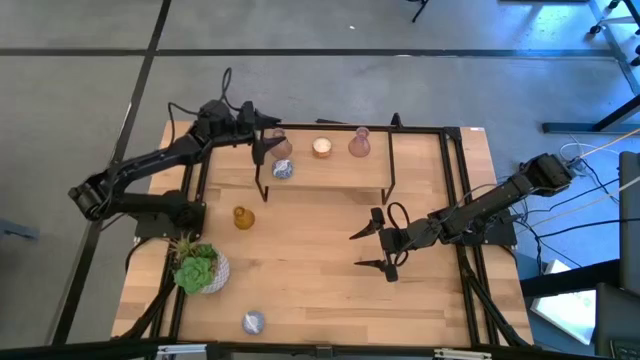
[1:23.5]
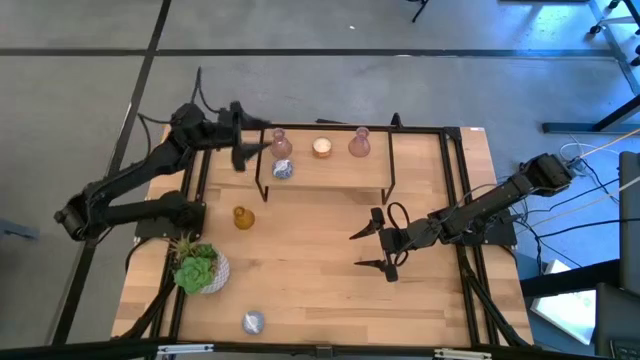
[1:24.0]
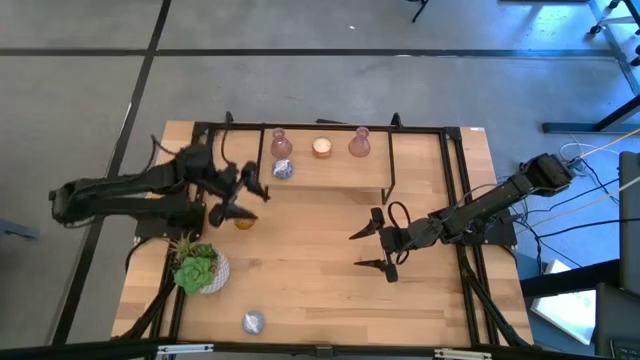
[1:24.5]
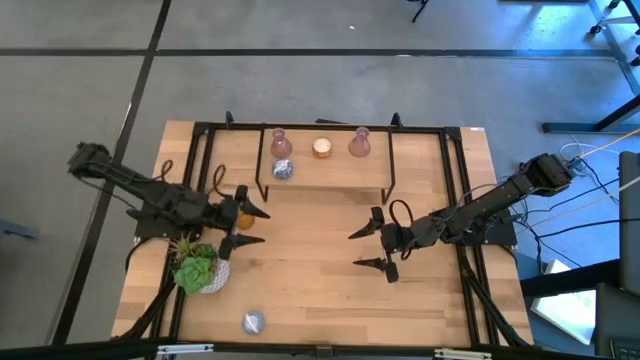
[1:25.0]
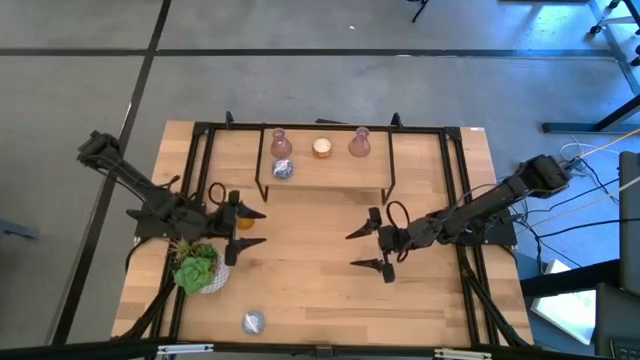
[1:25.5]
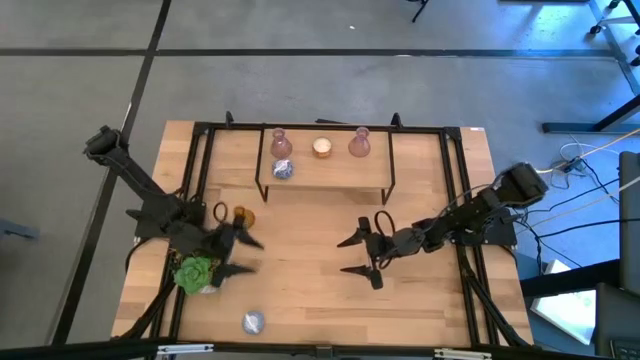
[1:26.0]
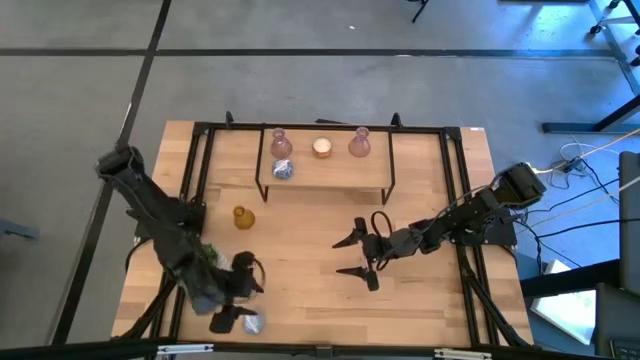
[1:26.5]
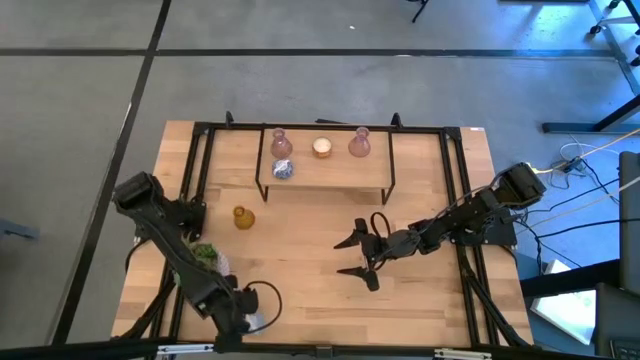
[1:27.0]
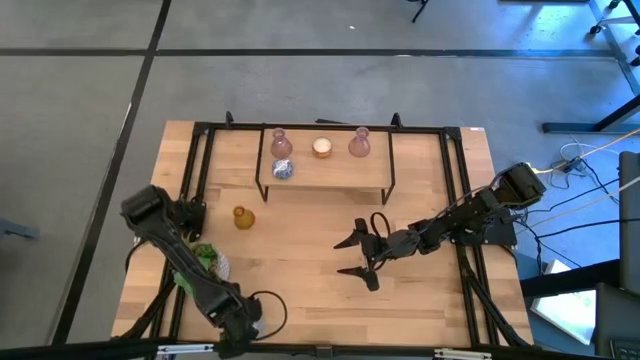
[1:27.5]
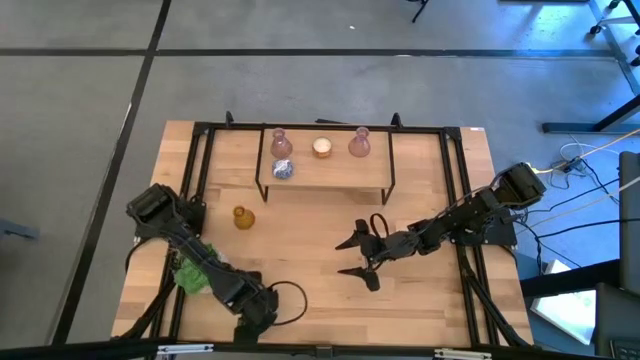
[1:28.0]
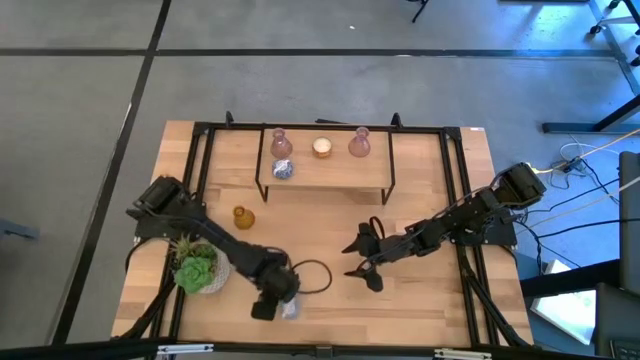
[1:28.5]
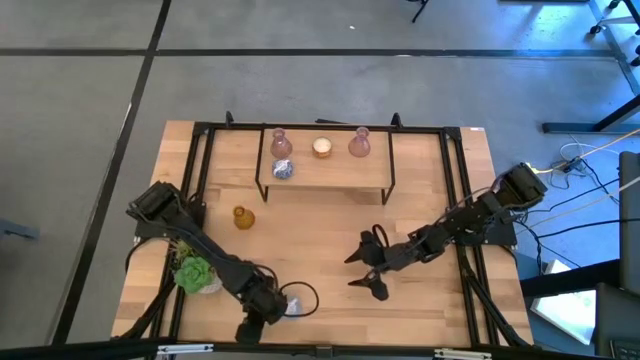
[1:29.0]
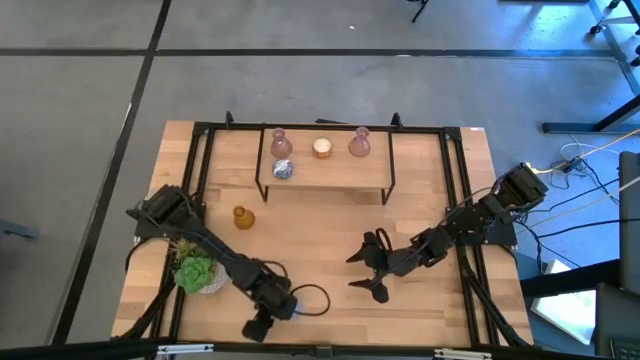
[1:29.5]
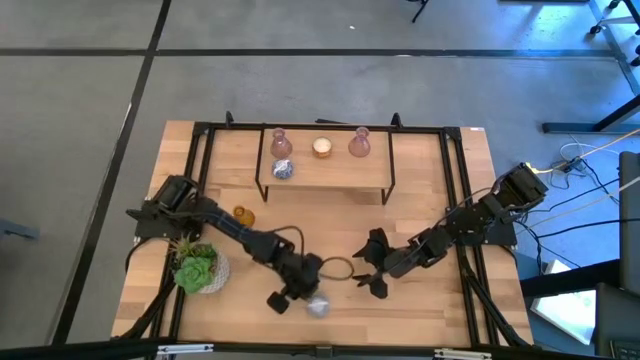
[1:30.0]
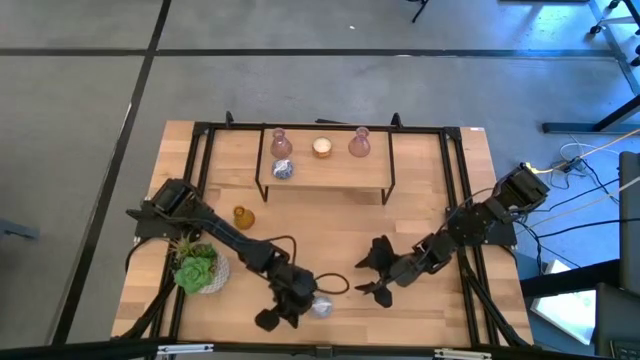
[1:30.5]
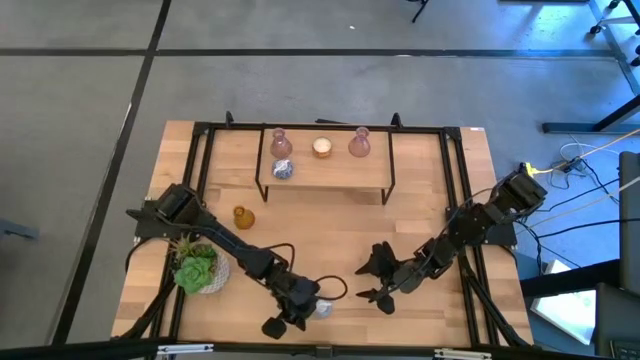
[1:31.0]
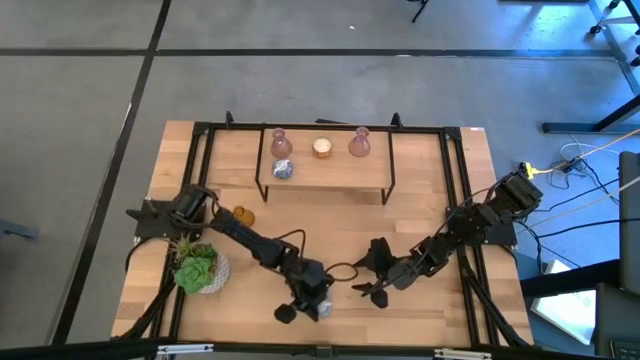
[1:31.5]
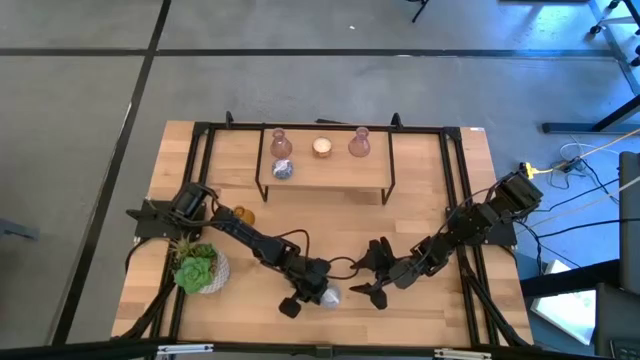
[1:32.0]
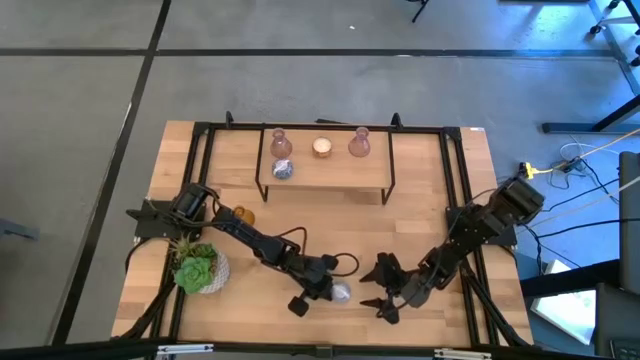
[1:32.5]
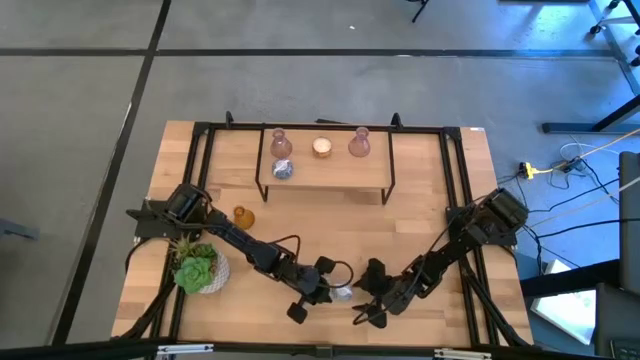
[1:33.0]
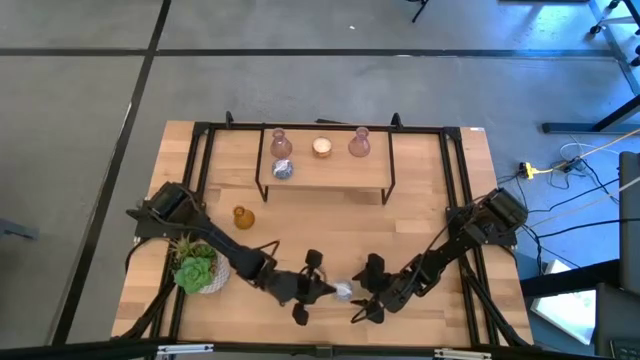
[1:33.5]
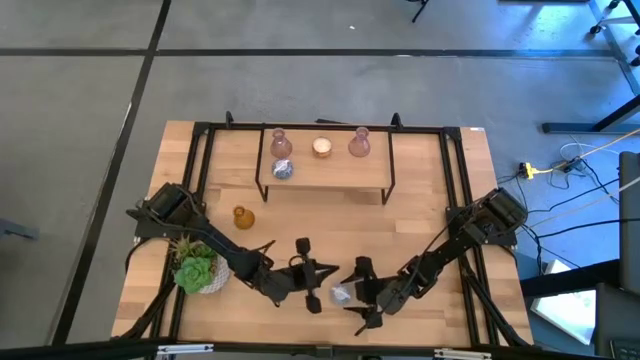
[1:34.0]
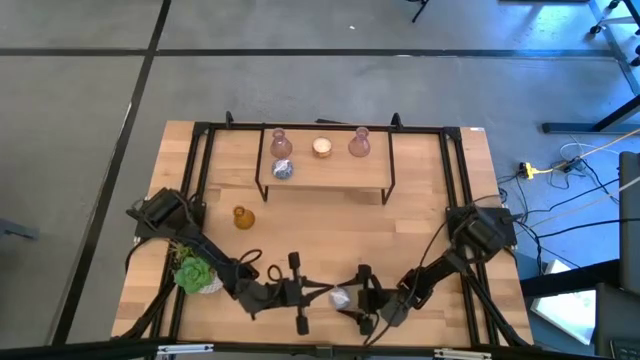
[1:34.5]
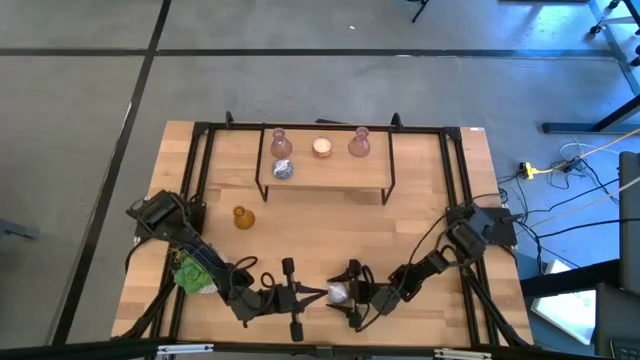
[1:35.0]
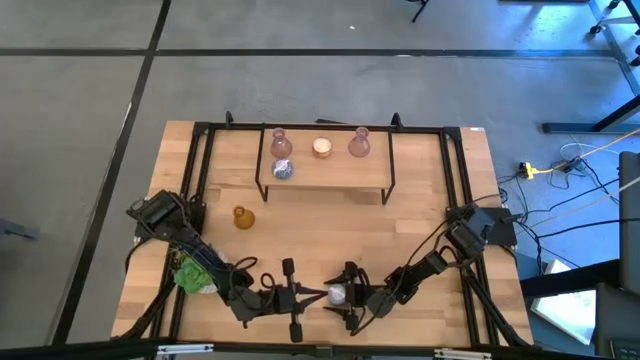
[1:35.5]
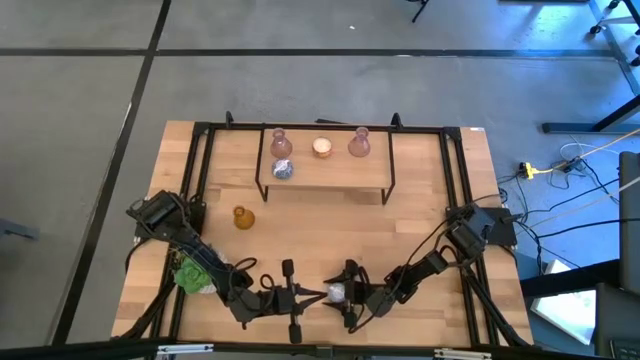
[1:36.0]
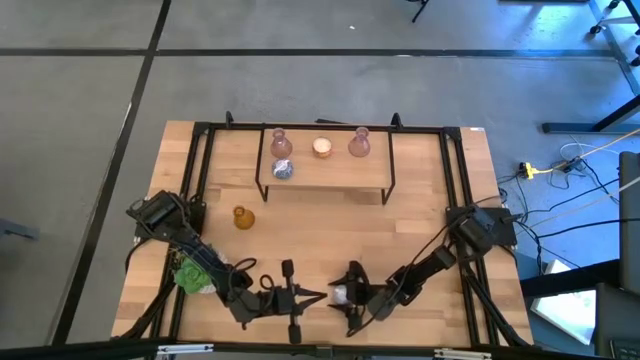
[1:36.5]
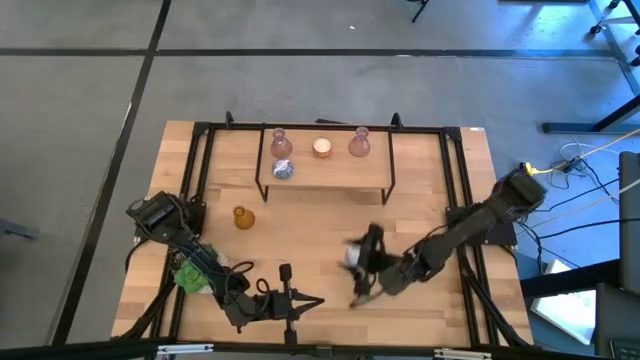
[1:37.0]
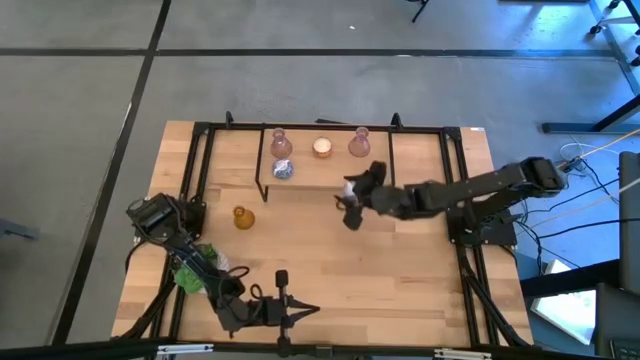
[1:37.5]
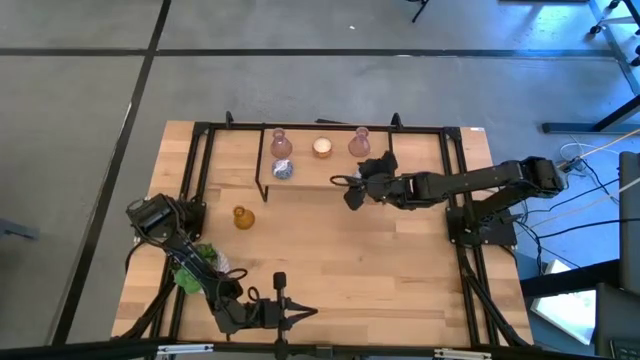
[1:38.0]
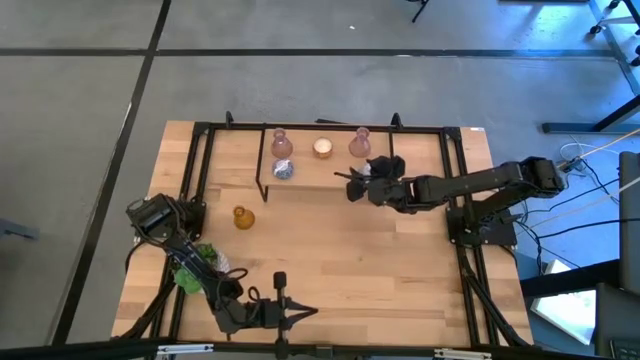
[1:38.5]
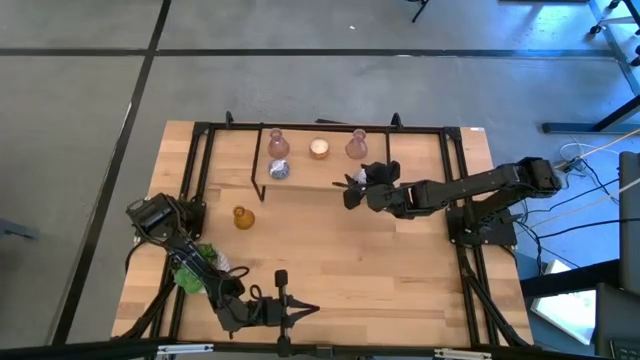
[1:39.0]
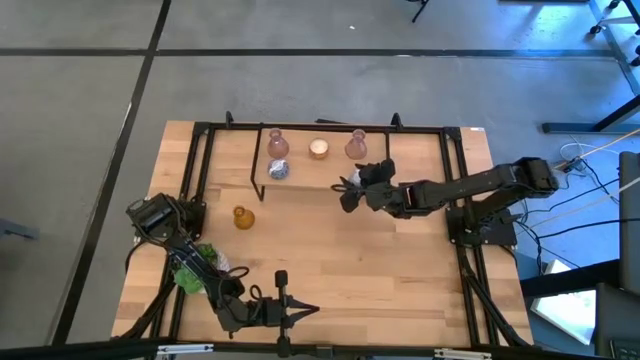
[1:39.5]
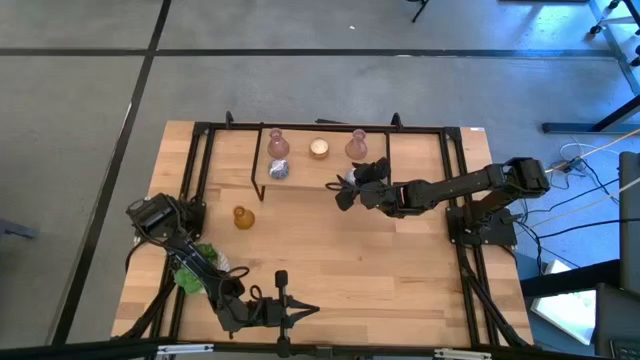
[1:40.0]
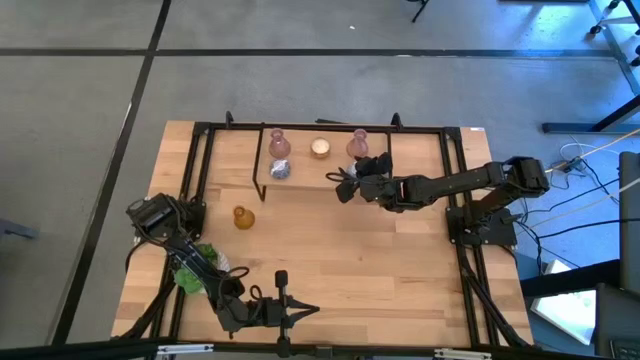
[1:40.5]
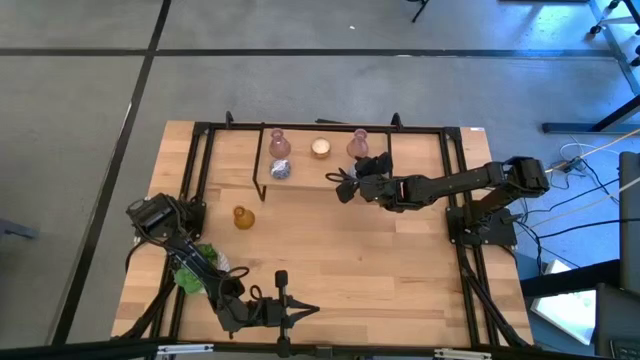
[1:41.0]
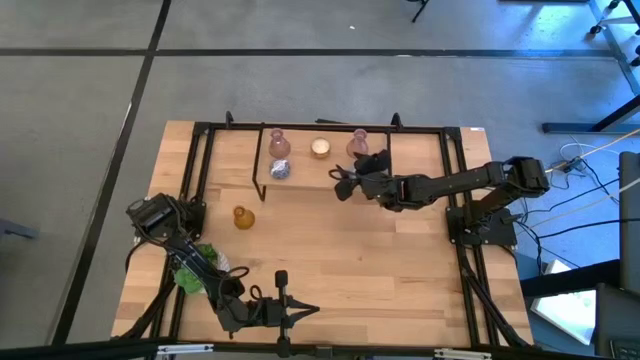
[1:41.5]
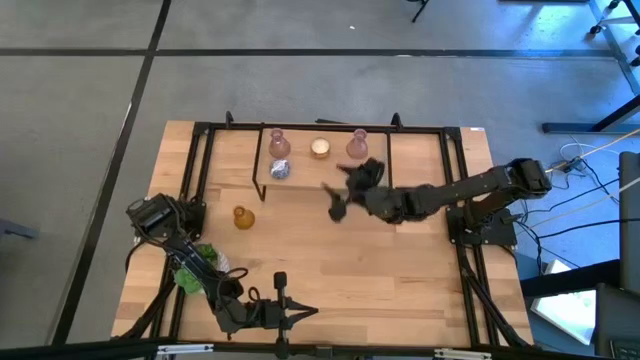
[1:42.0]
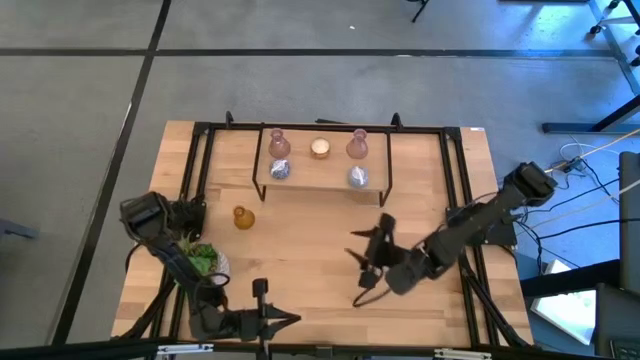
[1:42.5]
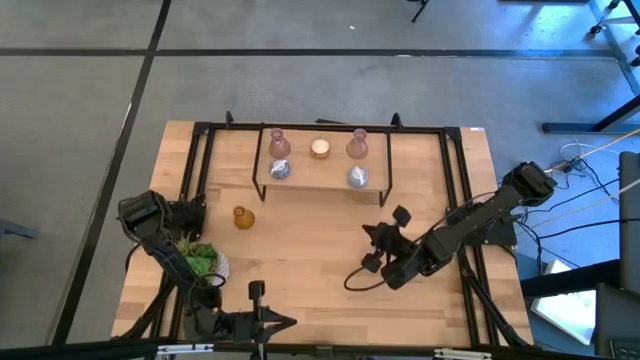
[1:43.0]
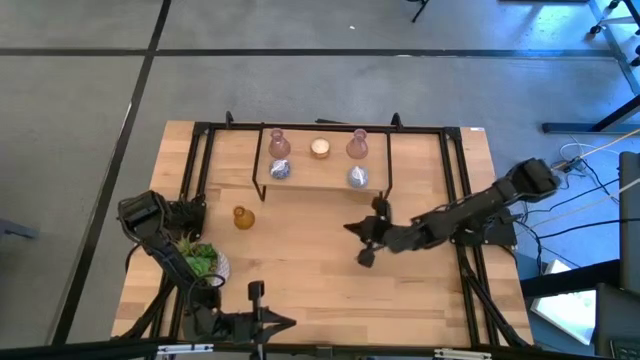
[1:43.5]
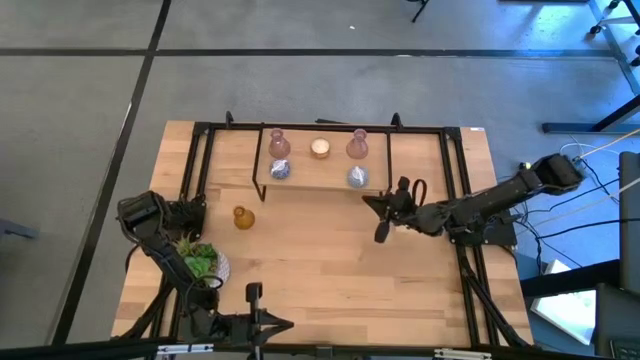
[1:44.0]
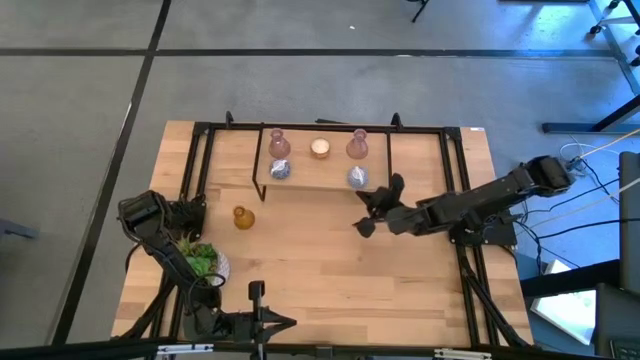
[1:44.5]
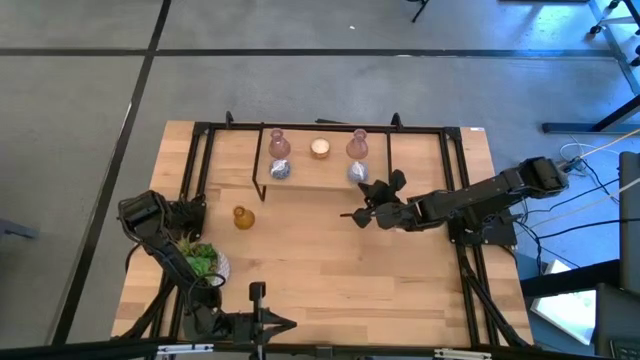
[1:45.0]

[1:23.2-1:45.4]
Task: Pick & Place candle stick holders
Put the white candle on the shelf
